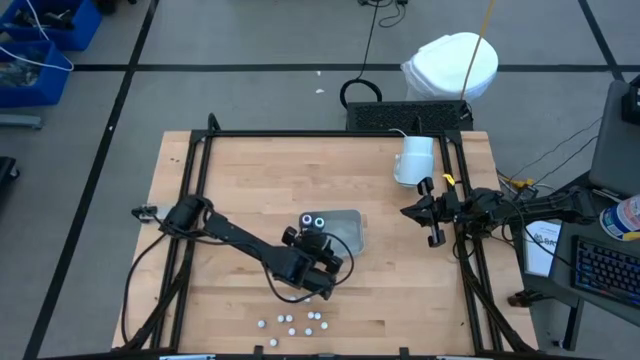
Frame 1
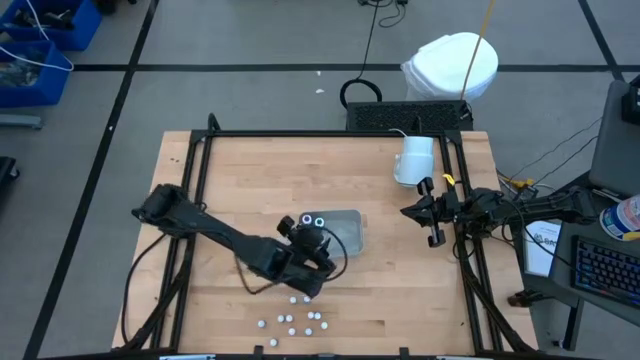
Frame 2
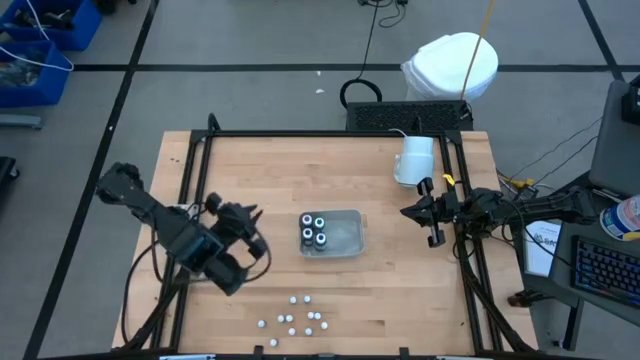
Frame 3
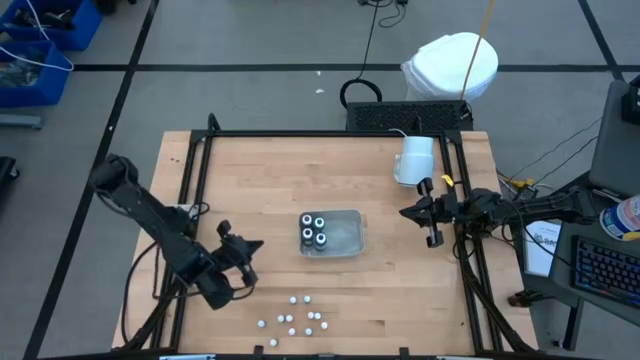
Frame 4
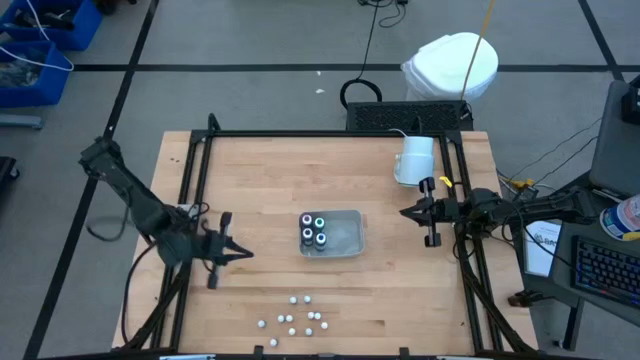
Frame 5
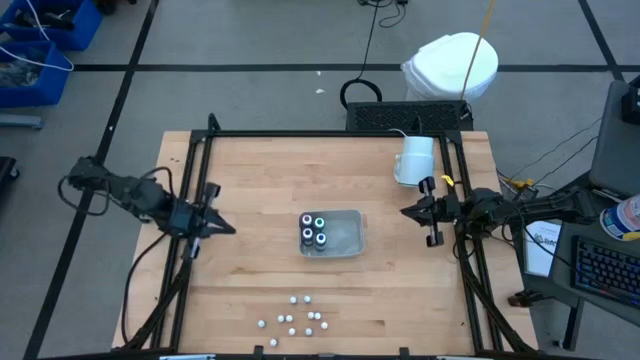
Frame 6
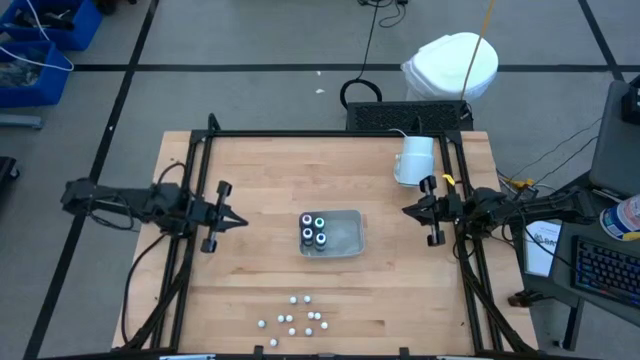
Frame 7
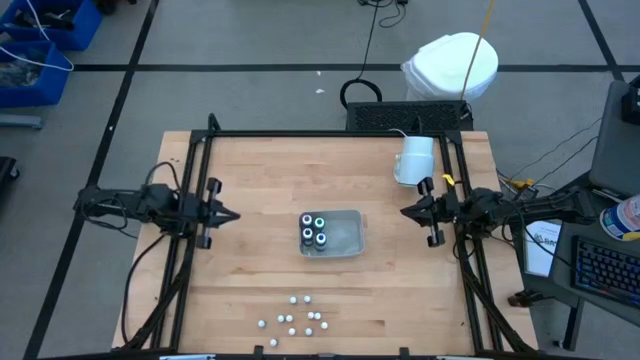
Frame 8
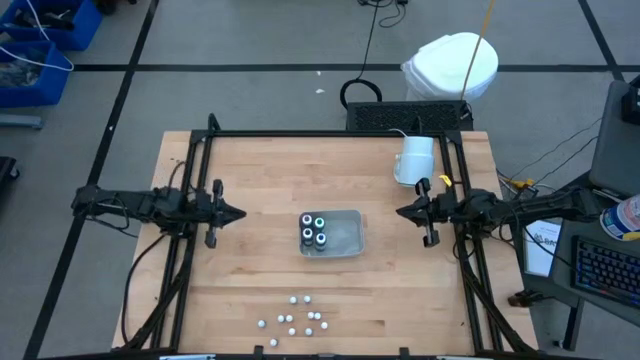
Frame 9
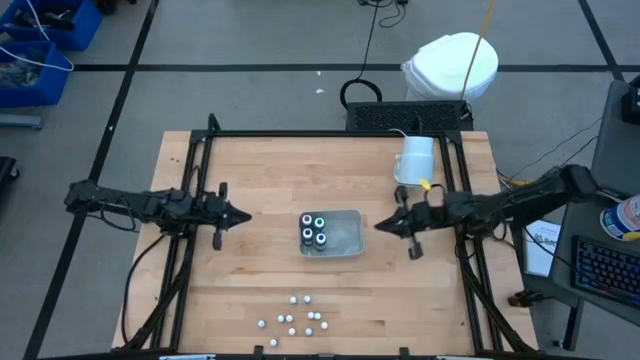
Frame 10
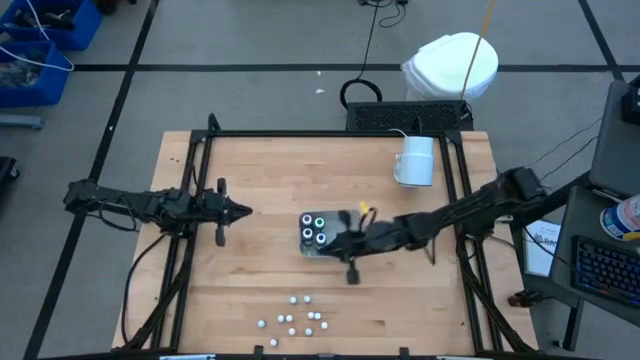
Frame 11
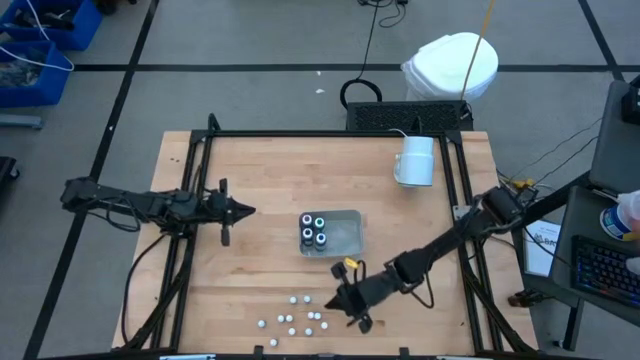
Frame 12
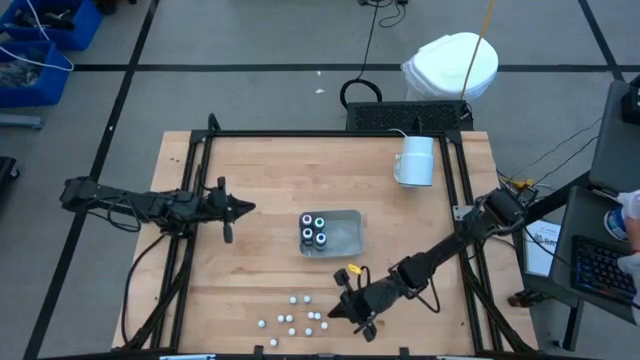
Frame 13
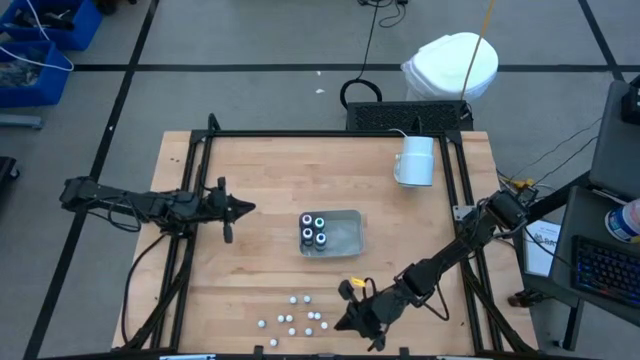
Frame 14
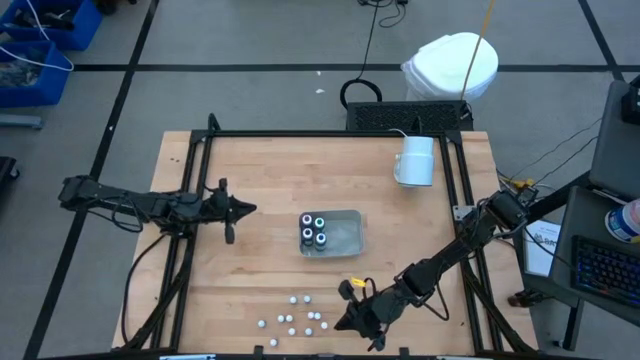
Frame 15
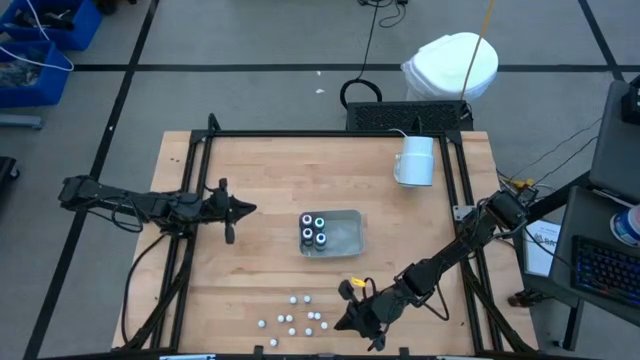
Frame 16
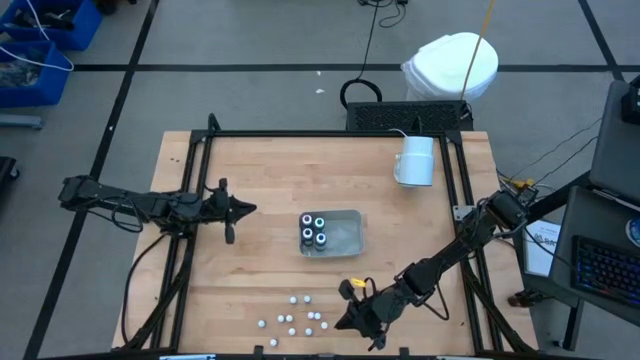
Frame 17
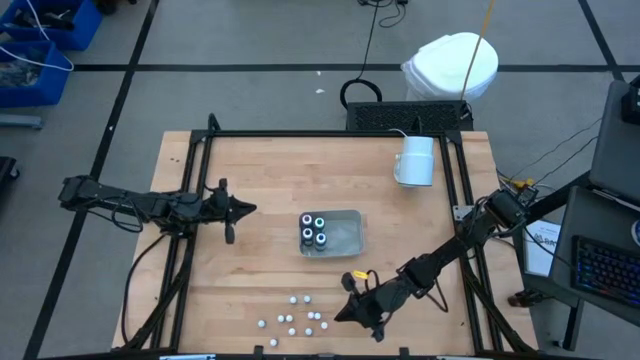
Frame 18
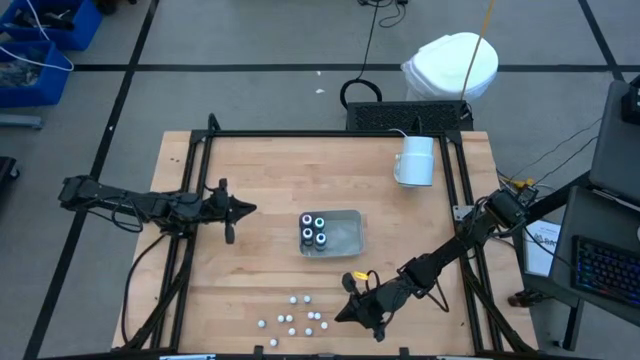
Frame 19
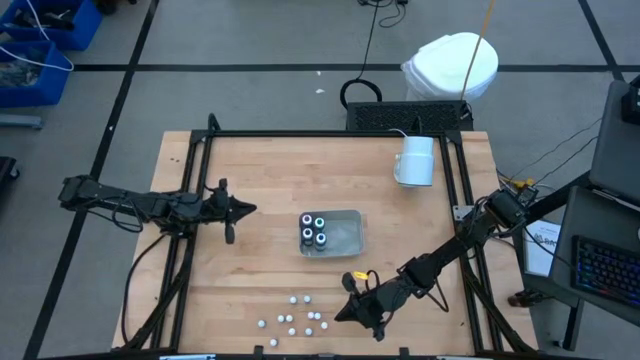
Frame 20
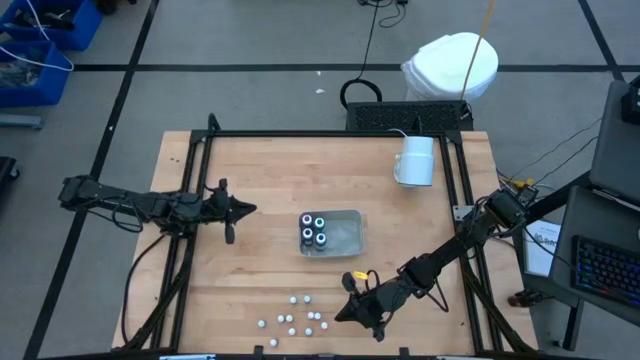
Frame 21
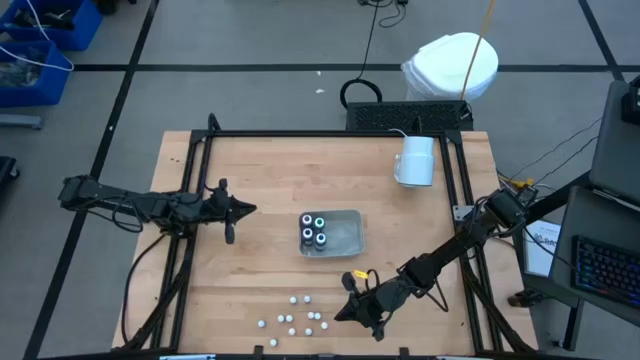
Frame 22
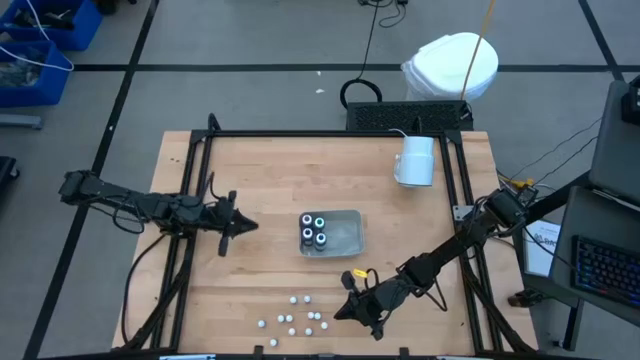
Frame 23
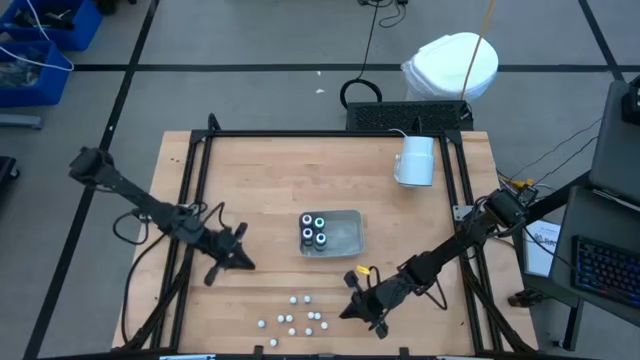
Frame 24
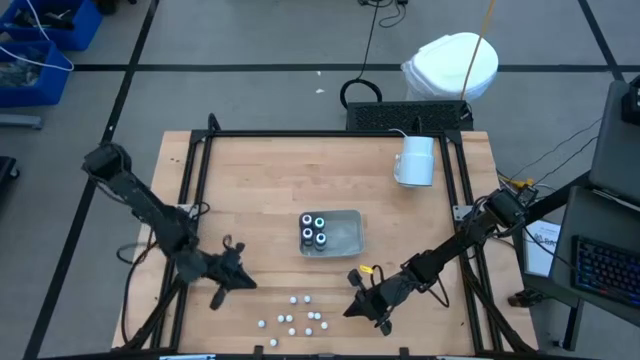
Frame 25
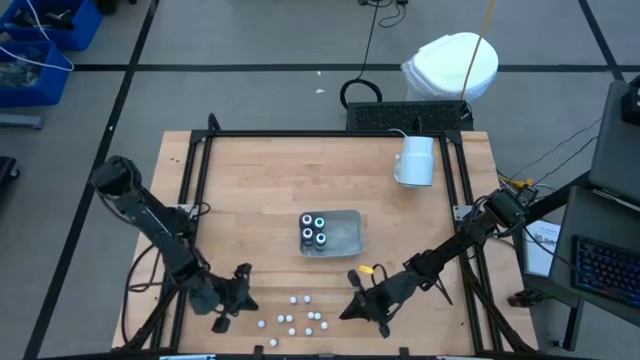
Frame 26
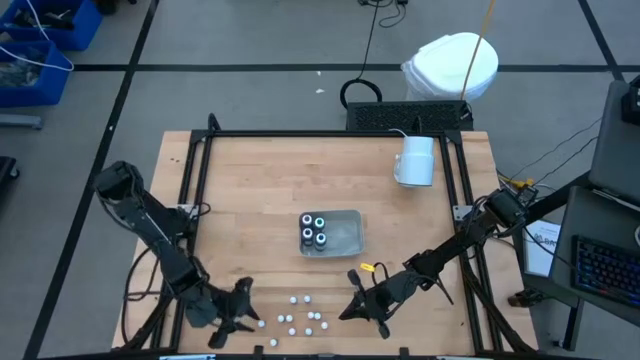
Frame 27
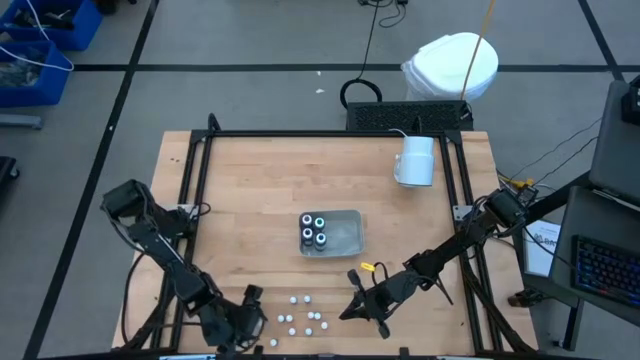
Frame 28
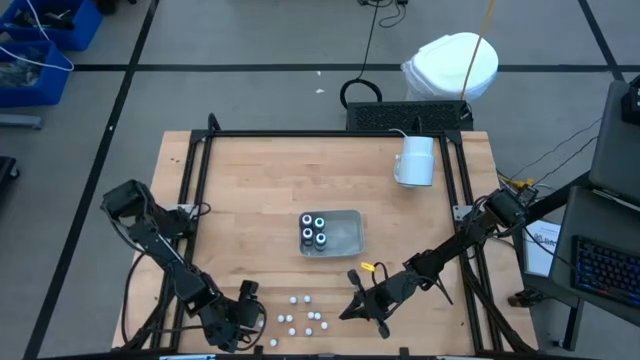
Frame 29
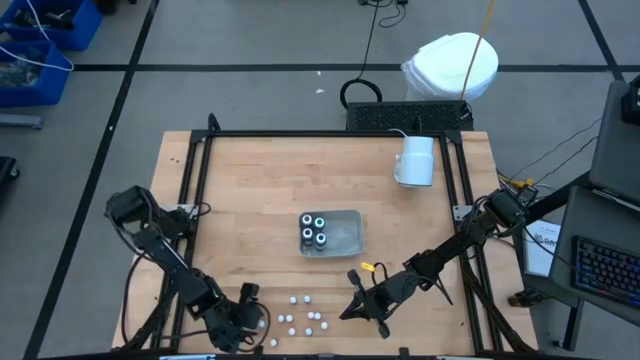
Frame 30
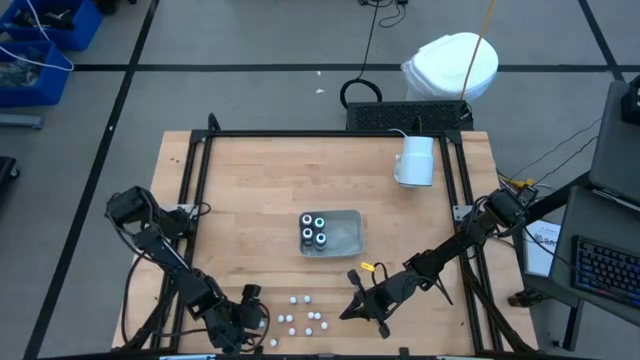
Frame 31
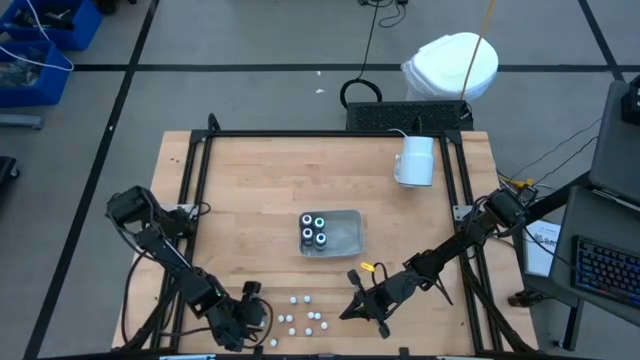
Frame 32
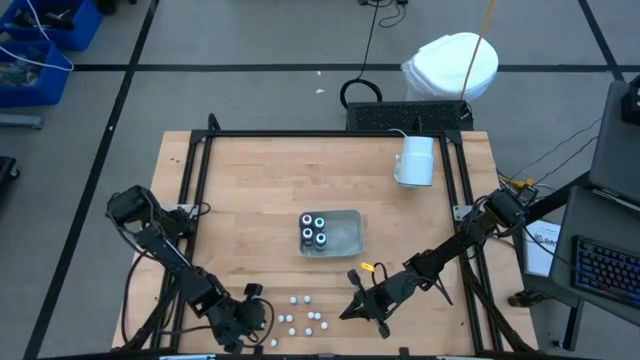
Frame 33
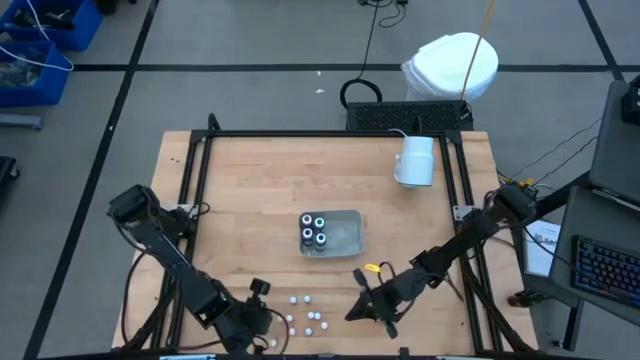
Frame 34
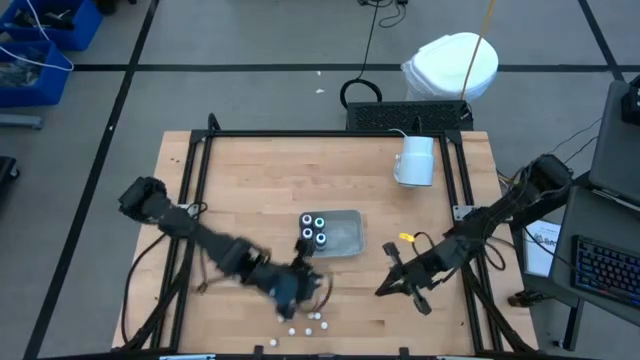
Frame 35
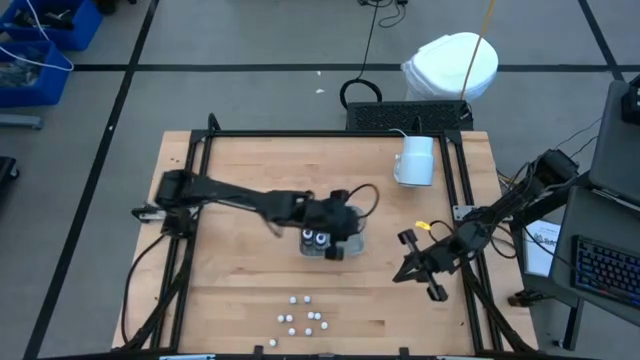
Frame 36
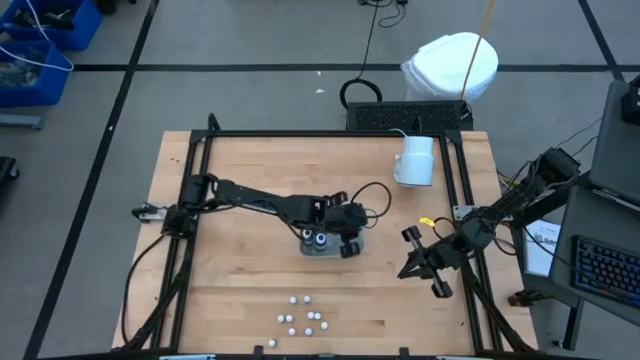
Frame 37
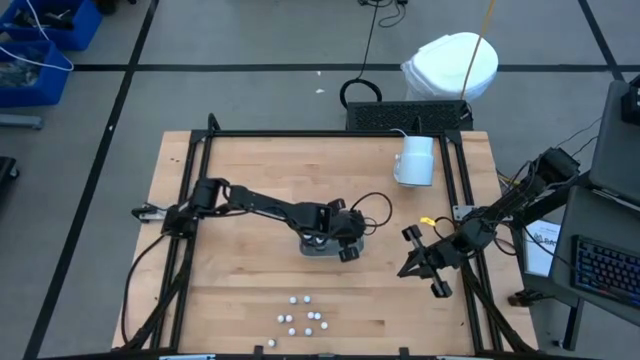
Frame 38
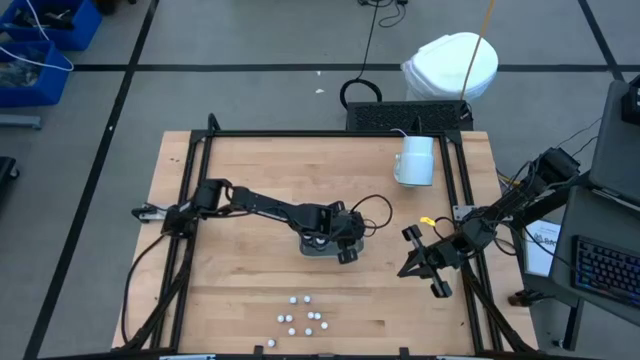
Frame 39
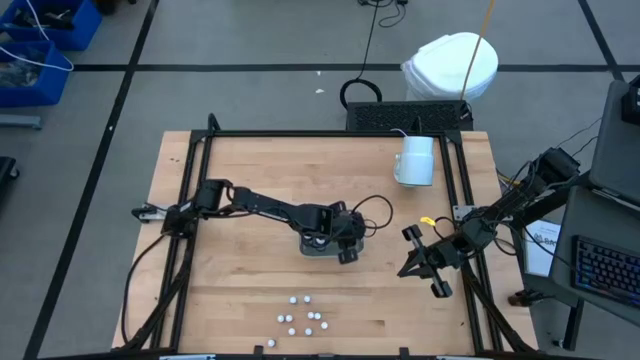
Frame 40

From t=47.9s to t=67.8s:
Task: Pick & Place food coloring
Put the small black food coloring into the gray bin
